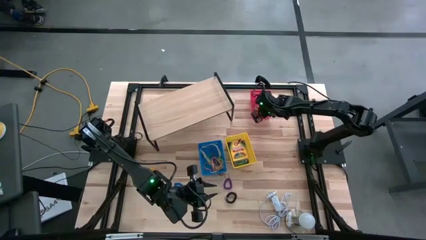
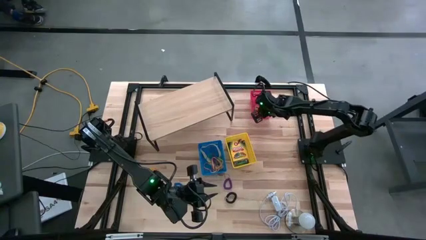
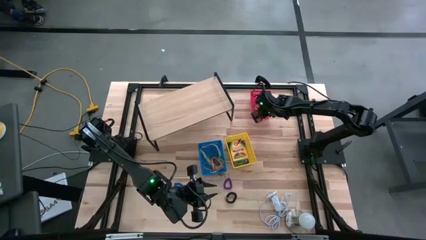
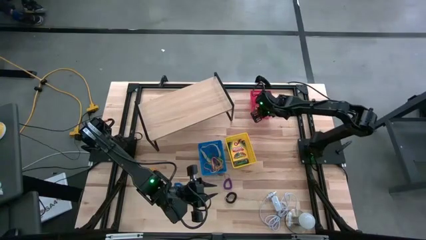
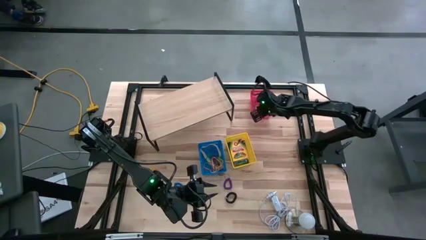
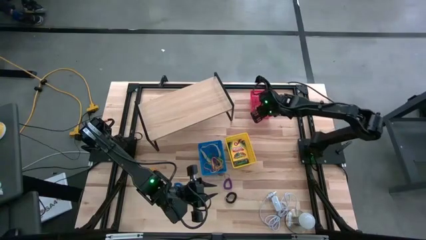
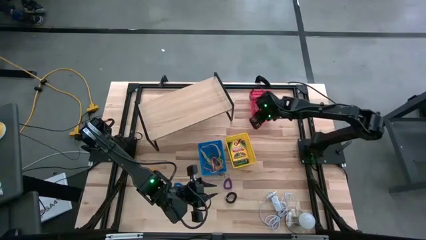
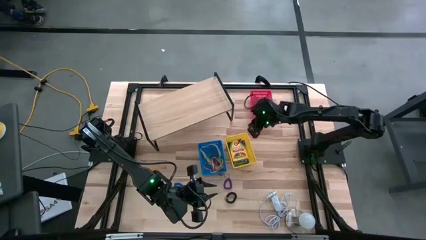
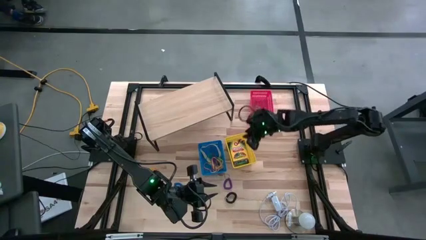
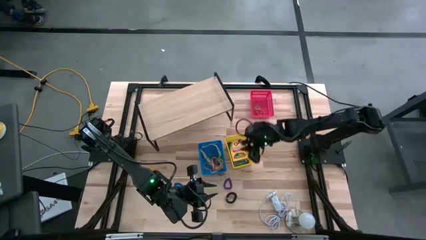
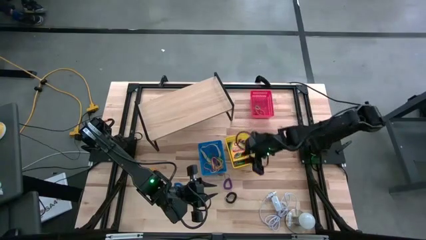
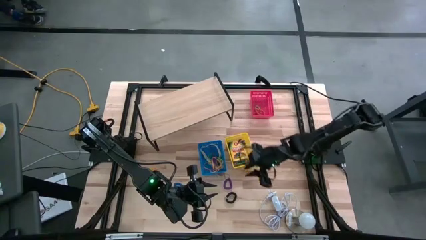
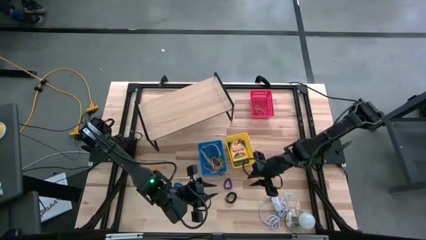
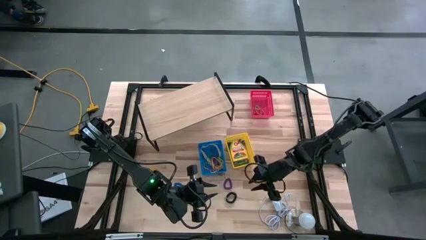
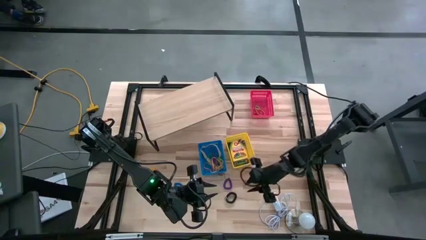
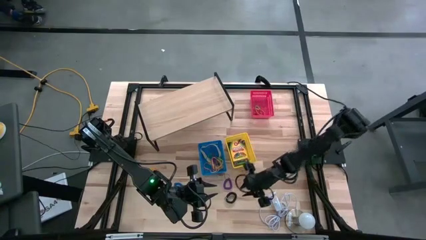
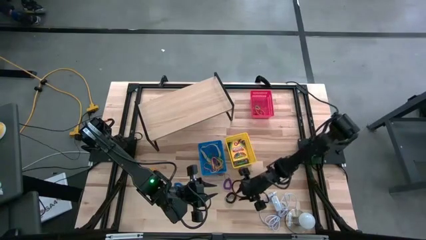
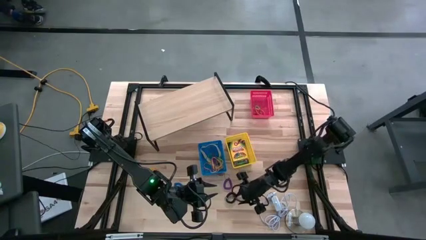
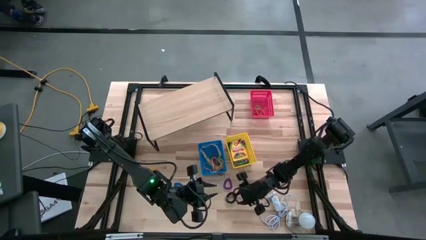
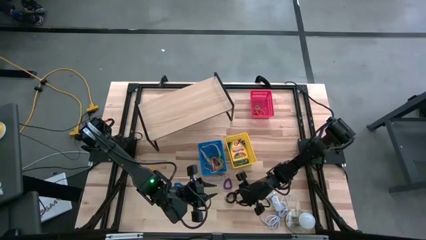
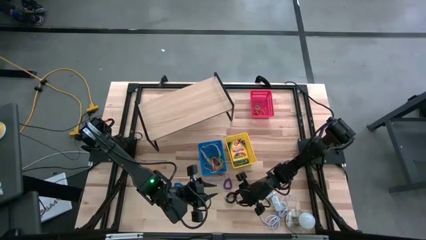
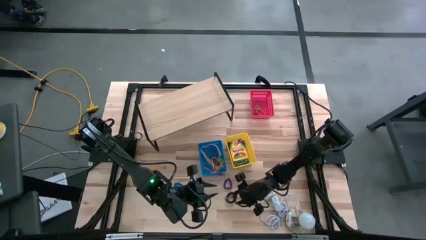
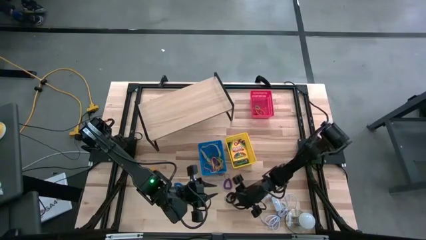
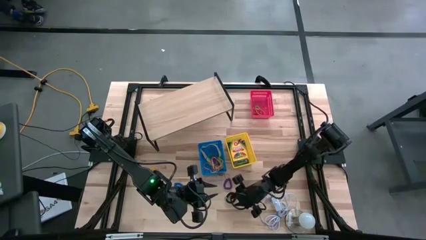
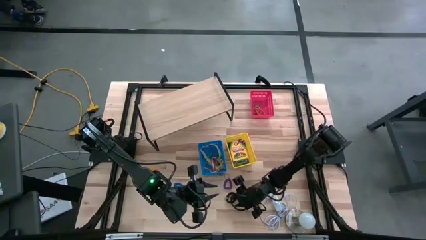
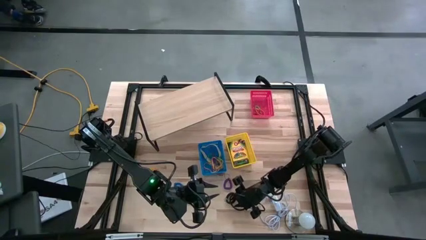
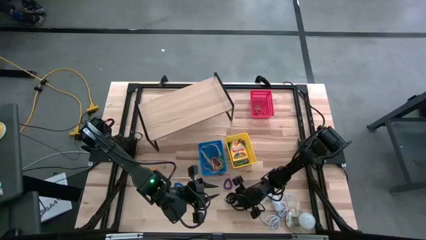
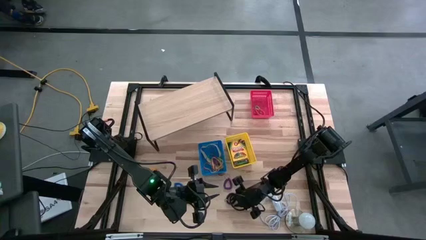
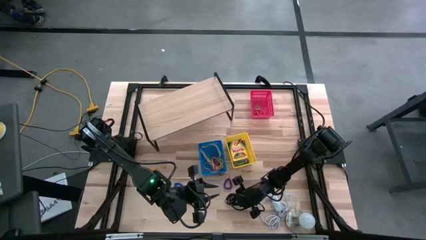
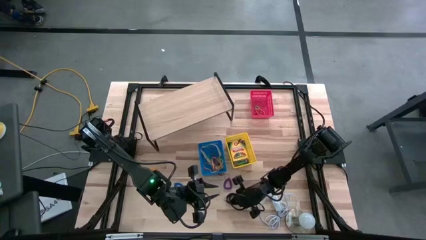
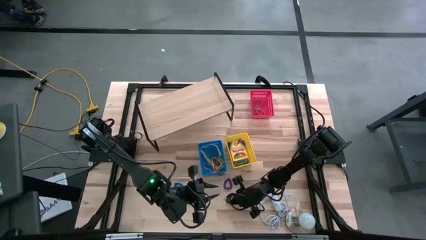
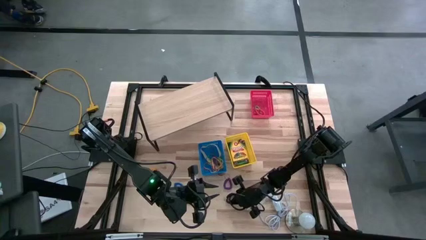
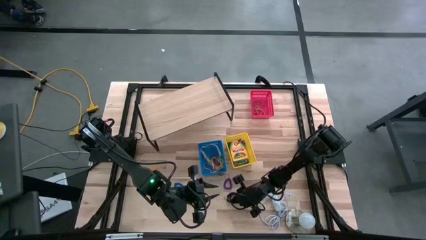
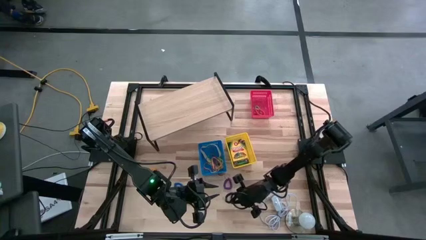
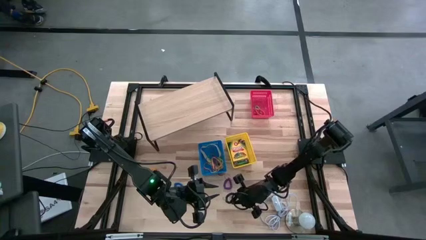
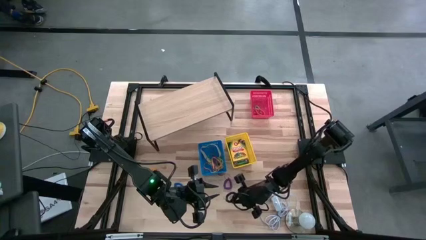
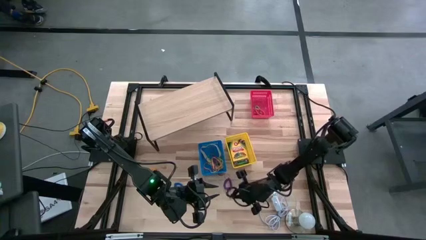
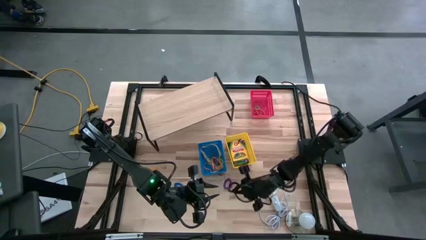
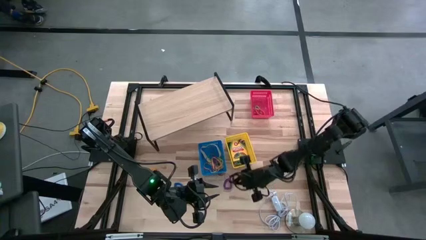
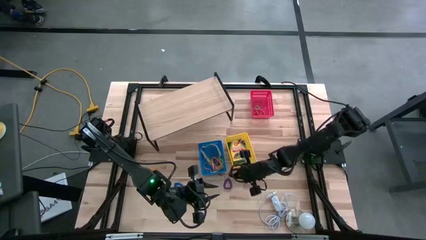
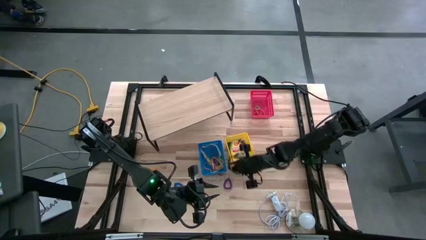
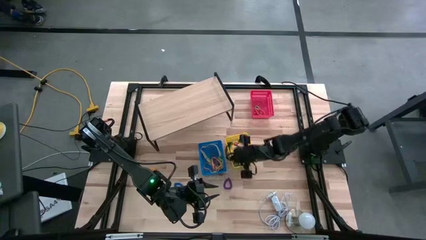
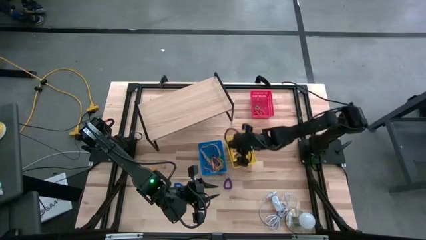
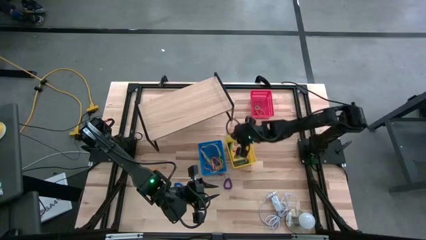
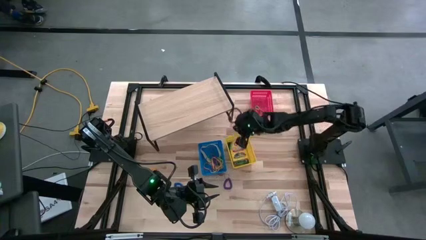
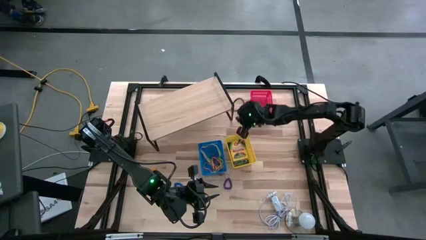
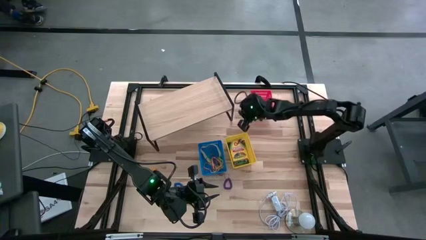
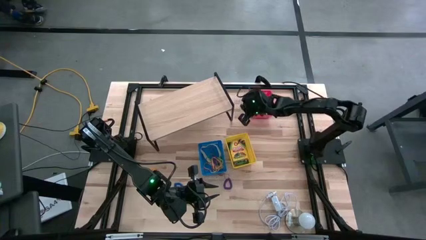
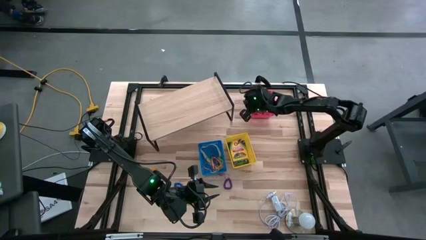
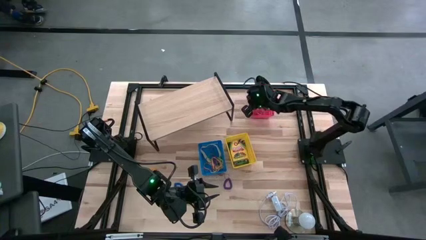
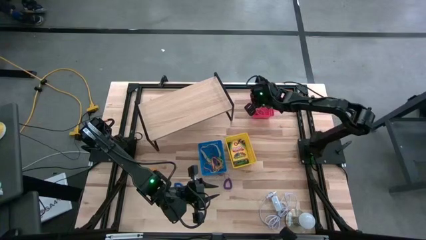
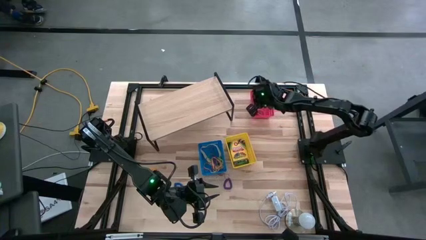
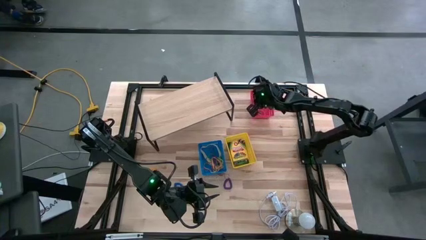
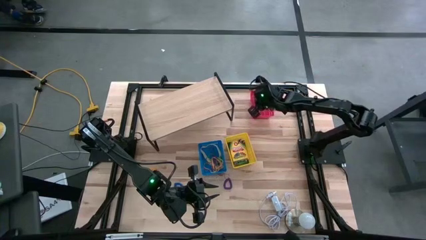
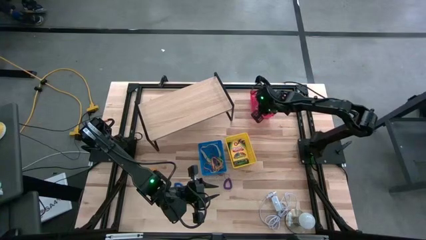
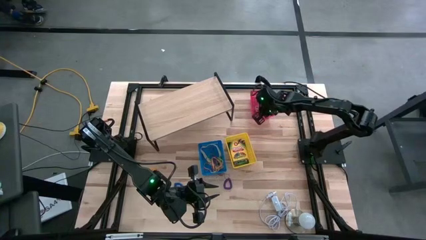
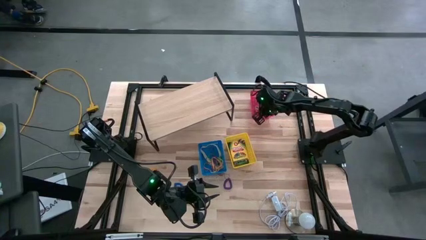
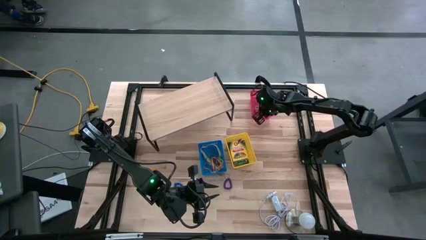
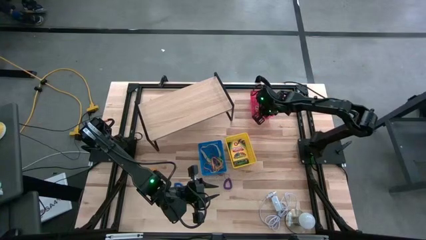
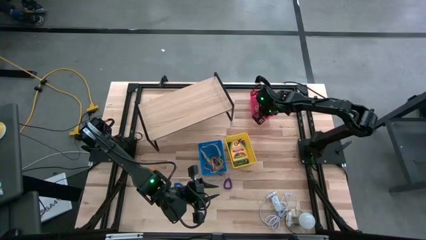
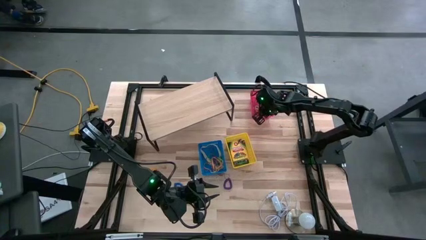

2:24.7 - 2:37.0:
Task: Pick & Place Office Desk Supplies
Put the black spring keychain into the red bin
